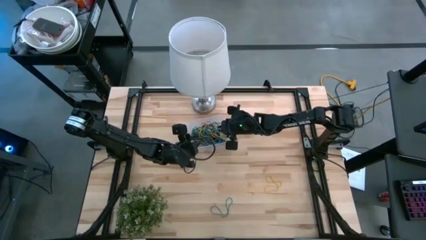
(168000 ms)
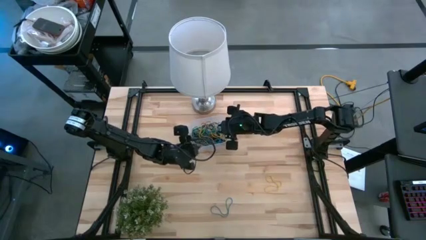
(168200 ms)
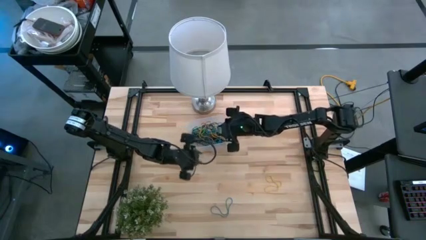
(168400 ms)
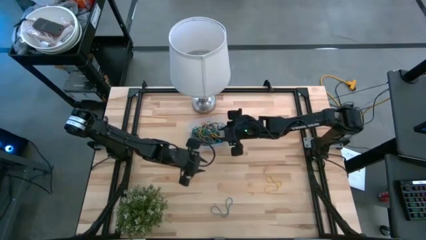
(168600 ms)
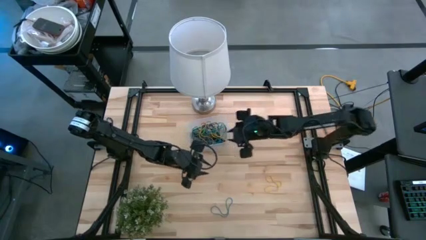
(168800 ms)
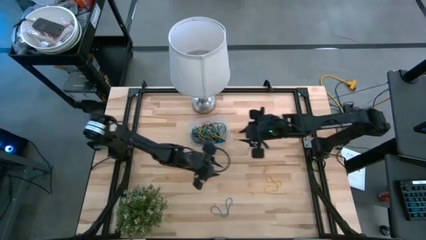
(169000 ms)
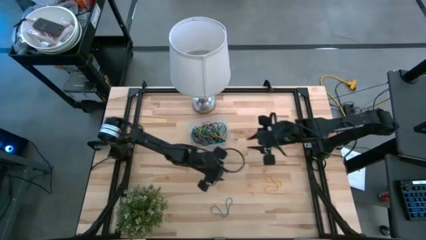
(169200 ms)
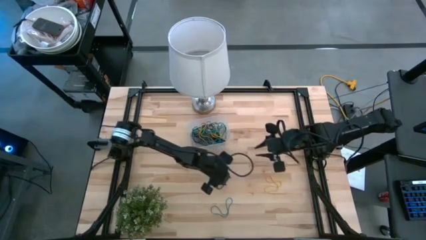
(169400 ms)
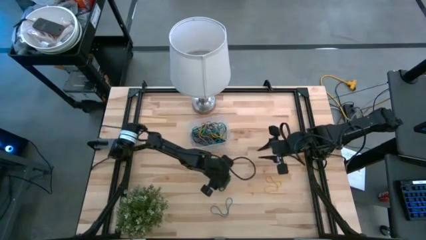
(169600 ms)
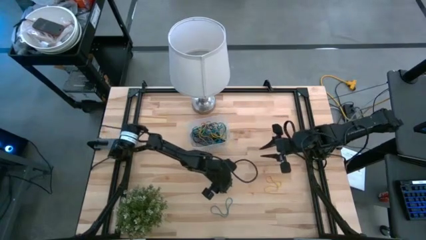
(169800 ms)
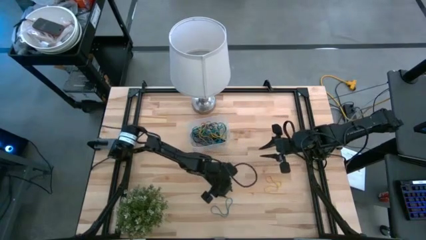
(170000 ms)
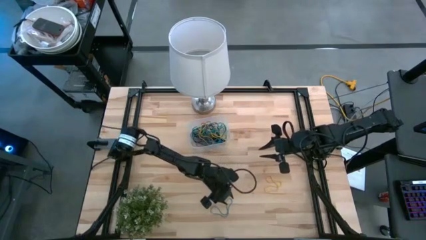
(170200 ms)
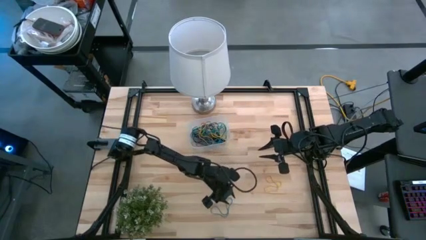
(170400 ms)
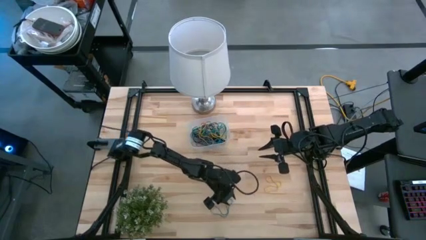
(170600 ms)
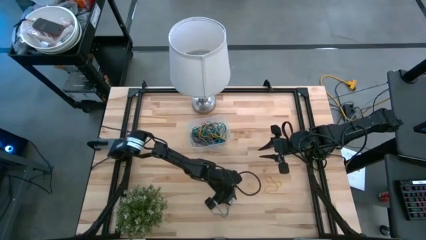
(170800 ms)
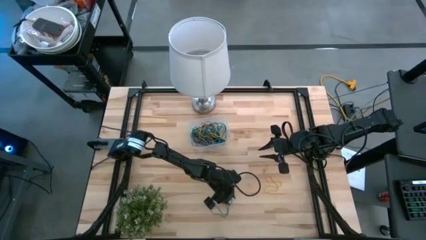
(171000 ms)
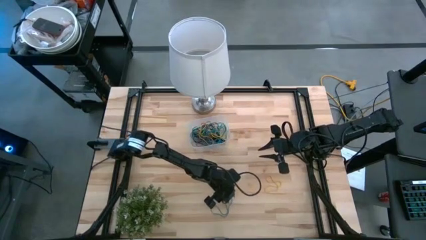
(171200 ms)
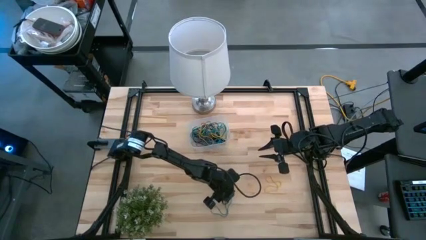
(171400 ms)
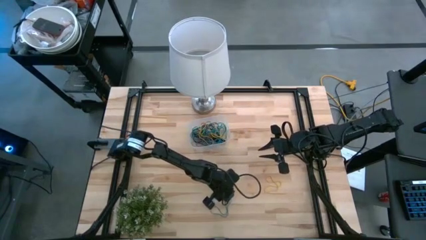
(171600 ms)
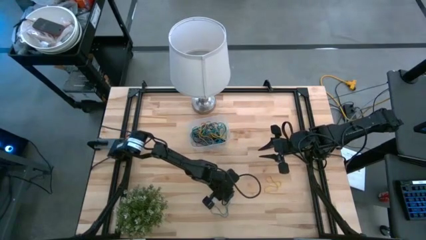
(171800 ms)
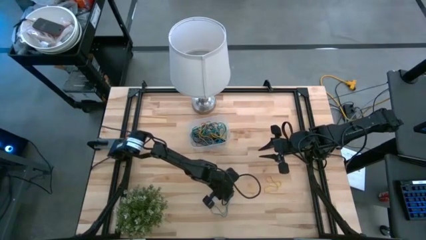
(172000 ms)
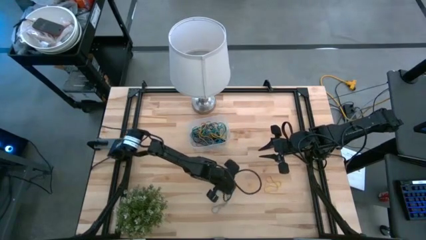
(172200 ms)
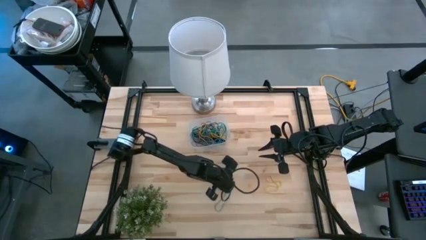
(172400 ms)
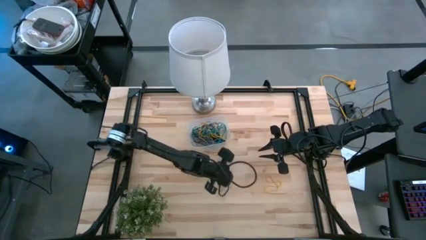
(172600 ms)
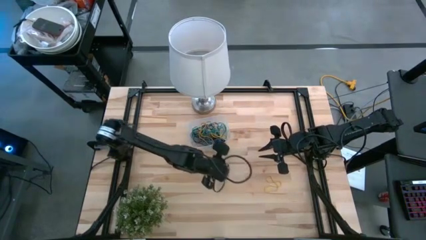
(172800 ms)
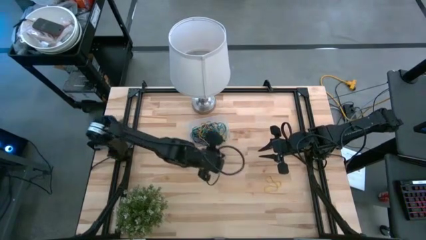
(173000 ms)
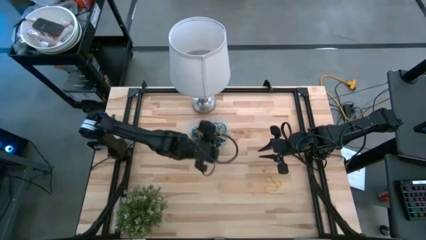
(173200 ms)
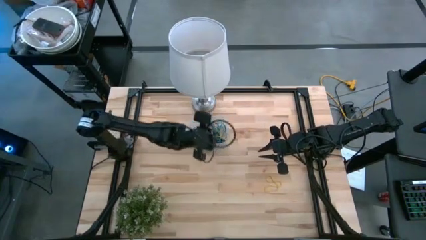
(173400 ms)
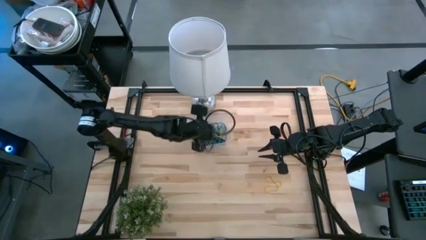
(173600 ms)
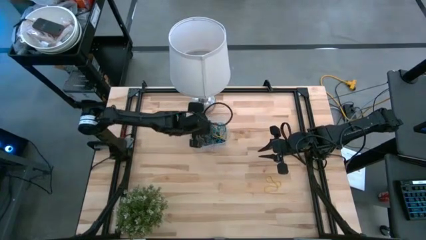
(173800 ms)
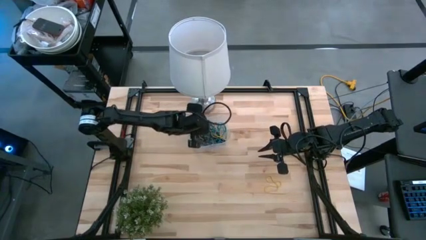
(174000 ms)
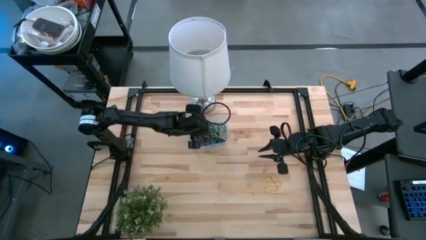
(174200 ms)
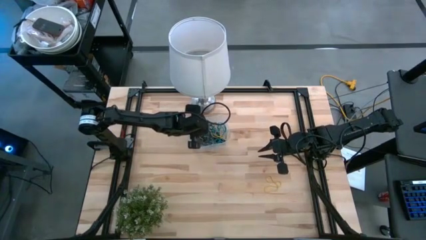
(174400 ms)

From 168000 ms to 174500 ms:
Task: Pick and place rubber bands into bin
Put the blue rubber band into the transparent container

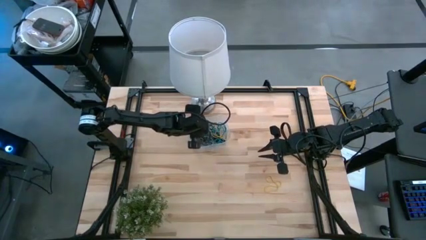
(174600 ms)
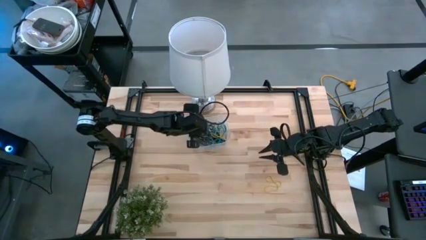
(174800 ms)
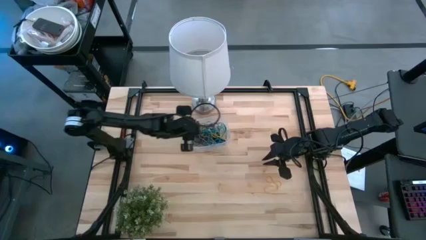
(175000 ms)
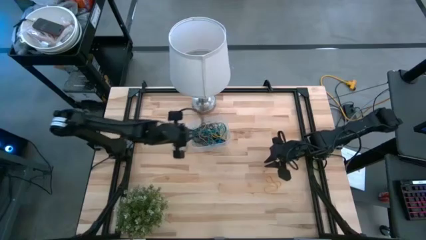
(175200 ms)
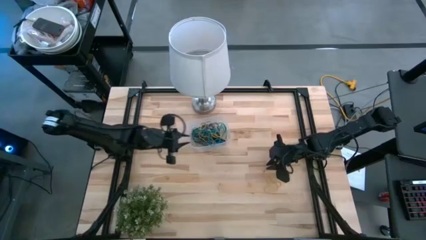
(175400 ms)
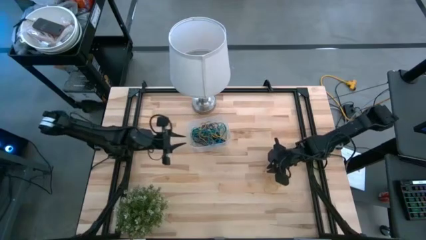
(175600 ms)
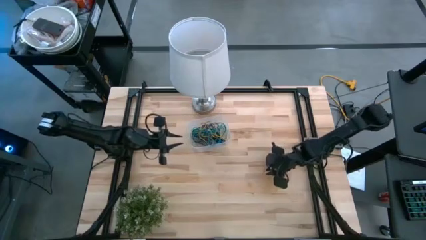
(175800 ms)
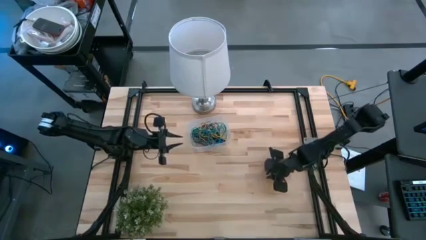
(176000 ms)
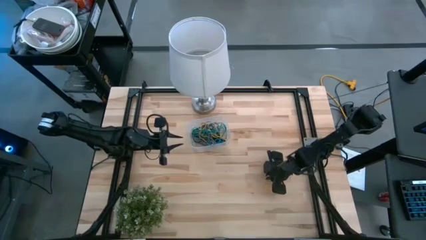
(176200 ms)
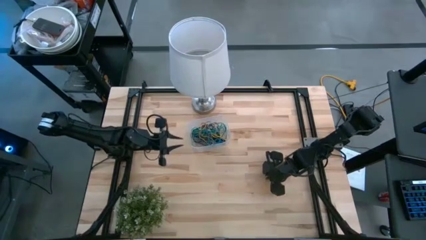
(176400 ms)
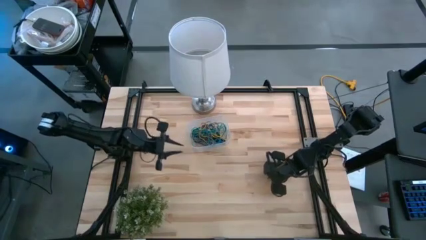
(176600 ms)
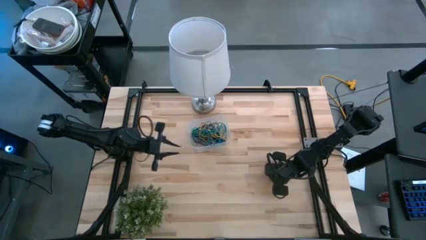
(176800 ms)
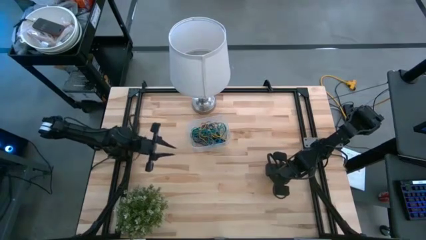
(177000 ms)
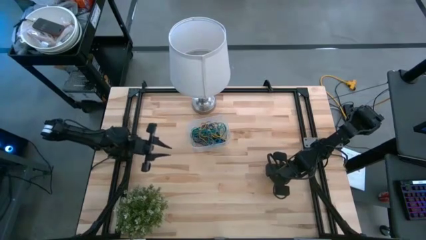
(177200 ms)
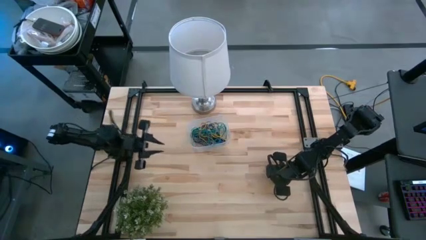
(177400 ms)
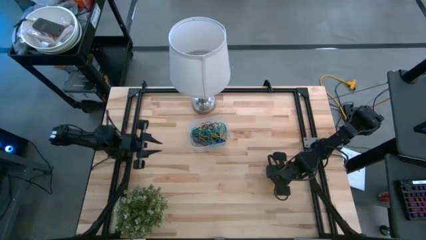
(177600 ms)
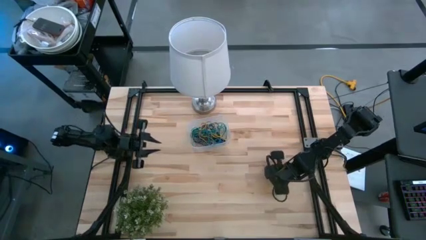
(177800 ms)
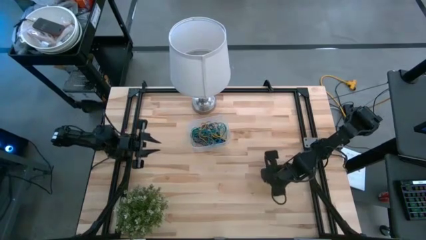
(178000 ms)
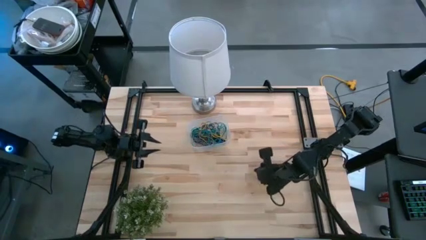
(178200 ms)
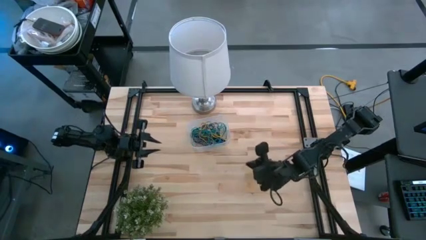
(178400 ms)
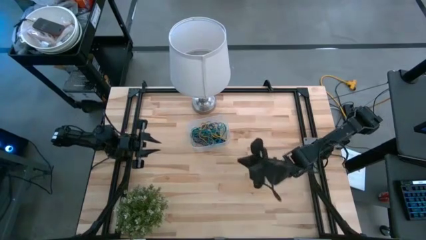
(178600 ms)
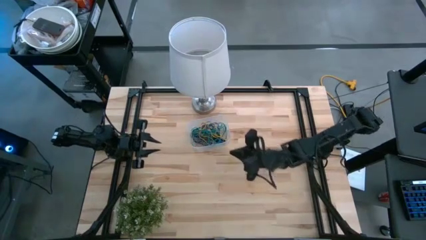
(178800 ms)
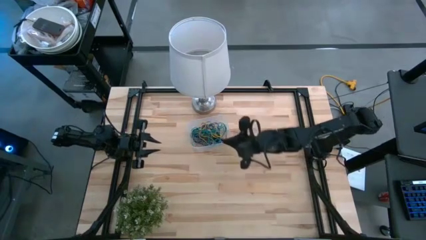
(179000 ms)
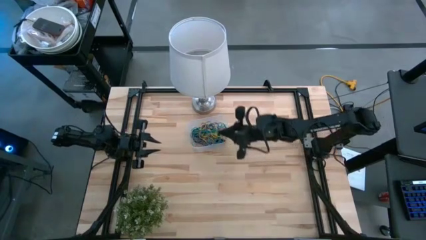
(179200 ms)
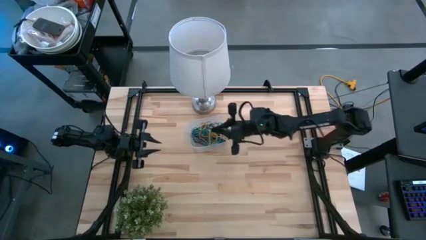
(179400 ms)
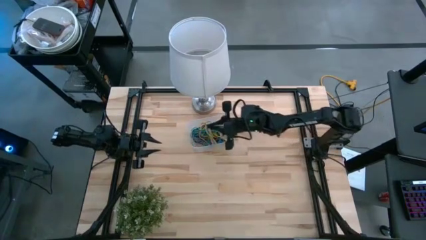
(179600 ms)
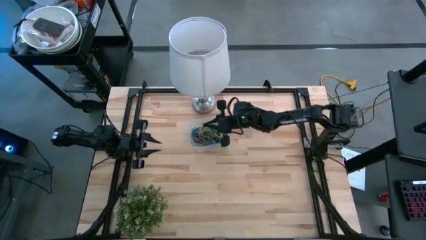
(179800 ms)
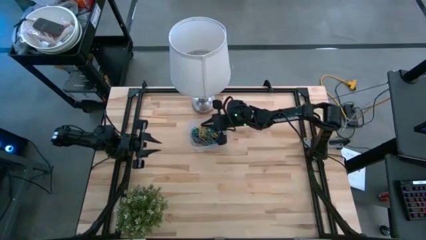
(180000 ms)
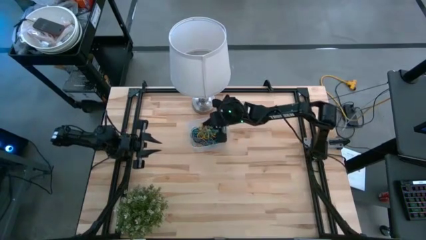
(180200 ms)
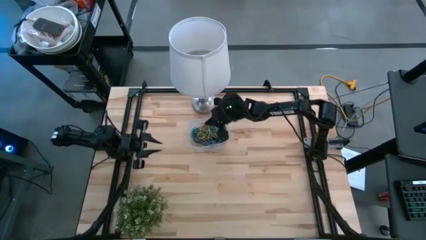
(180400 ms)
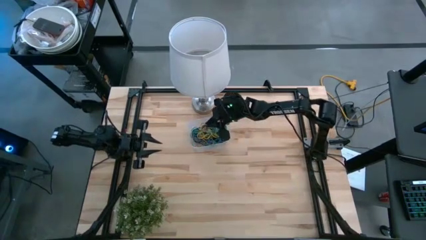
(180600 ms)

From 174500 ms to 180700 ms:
Put the yellow rubber band into the transparent container

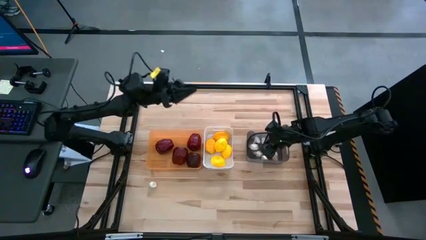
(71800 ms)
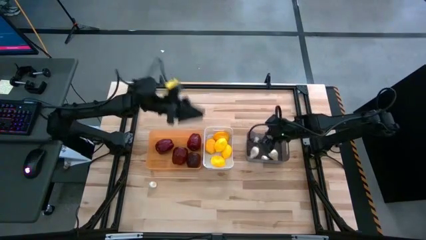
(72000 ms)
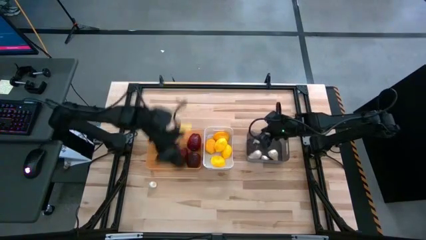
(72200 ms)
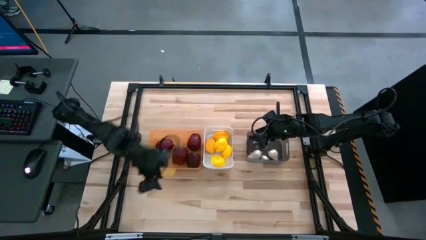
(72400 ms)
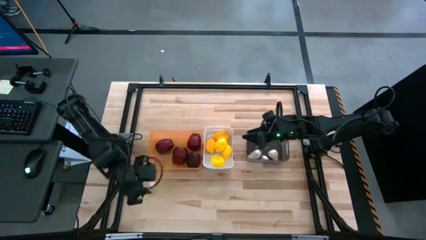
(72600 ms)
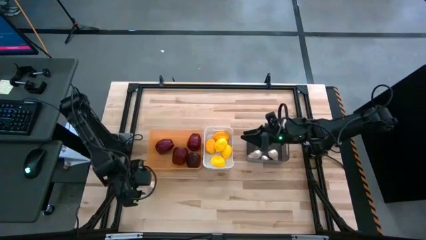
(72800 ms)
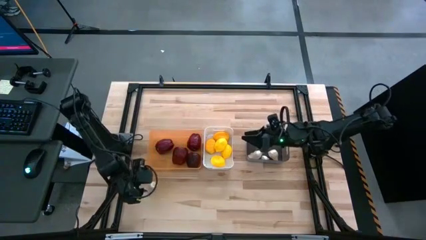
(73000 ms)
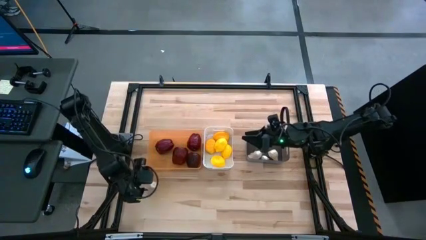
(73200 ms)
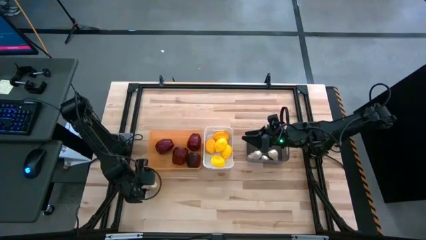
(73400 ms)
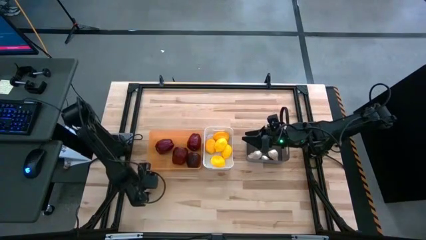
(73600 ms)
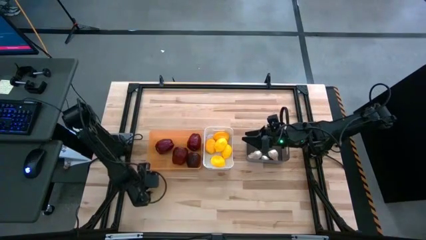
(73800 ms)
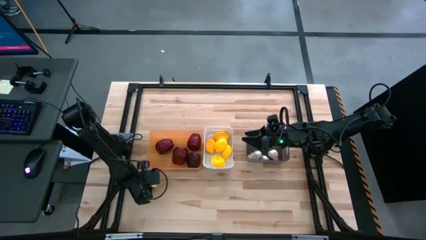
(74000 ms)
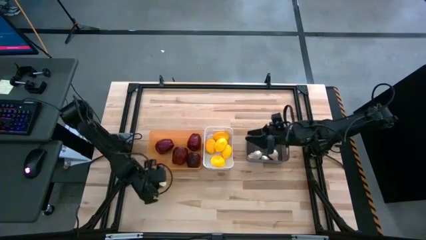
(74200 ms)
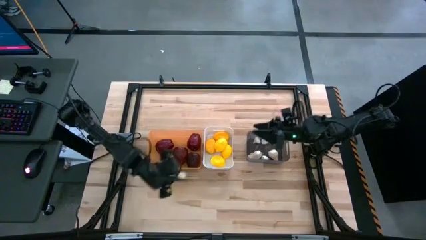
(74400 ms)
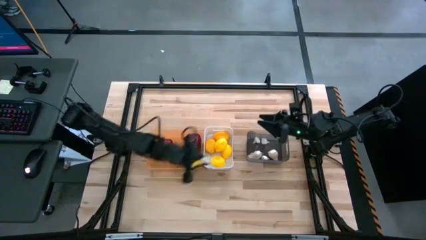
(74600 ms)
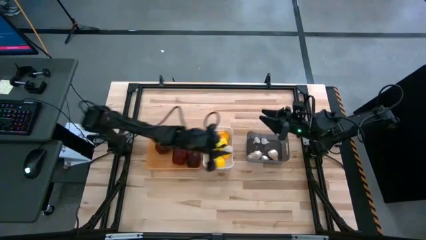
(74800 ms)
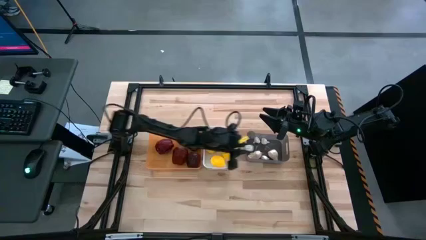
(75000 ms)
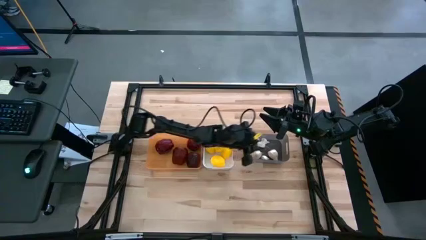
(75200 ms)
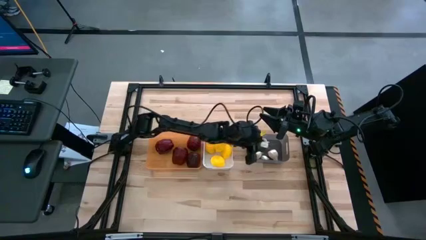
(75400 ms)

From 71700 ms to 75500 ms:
Task: Sort produce into baskets
Put the white garlic into the black bin
